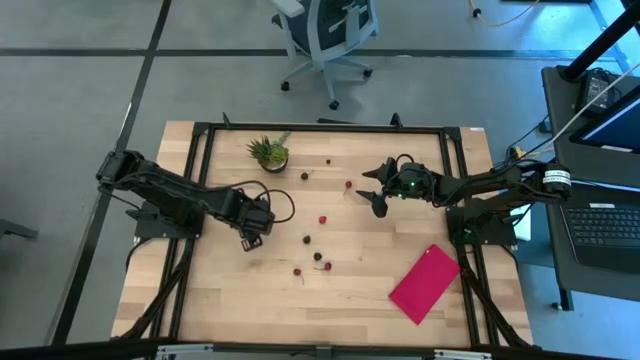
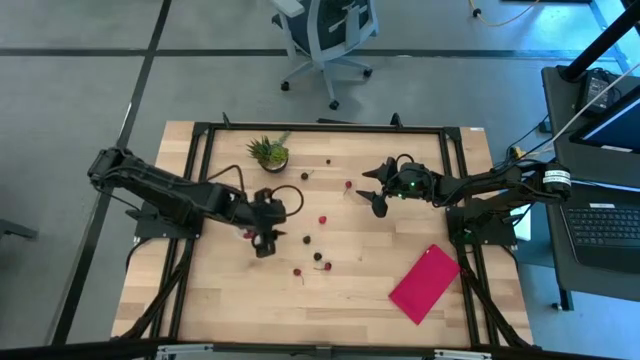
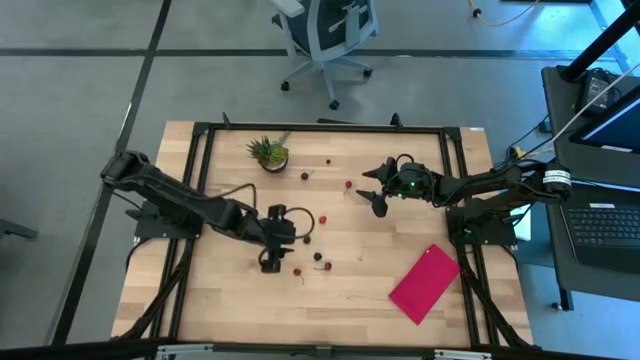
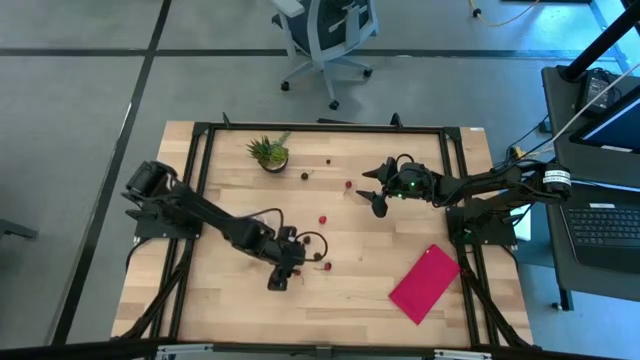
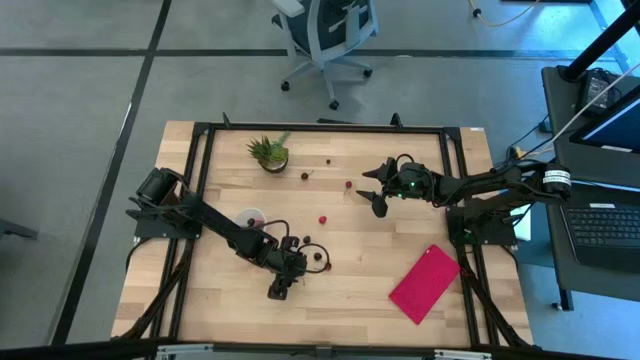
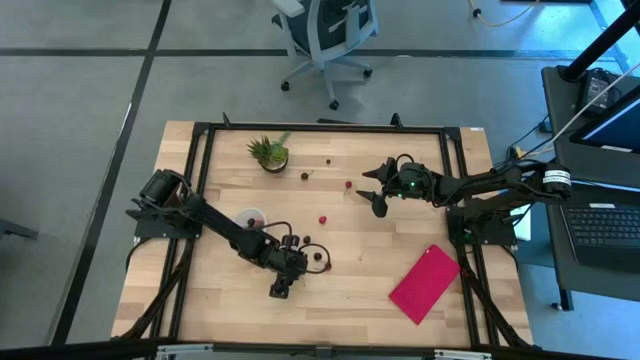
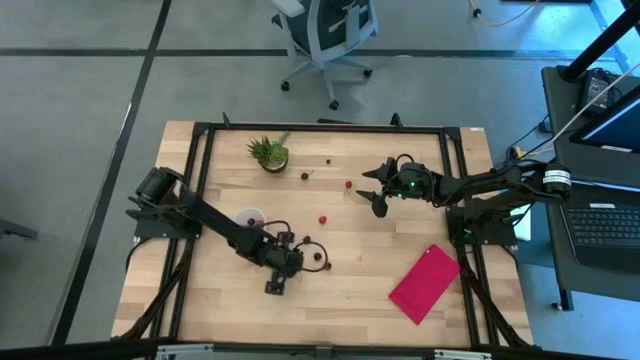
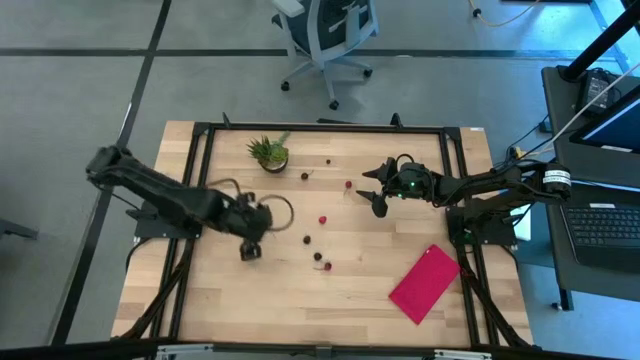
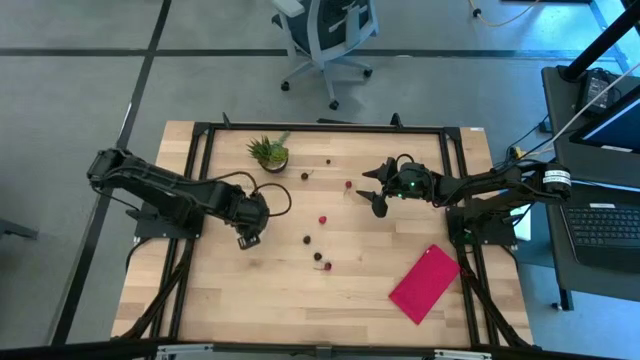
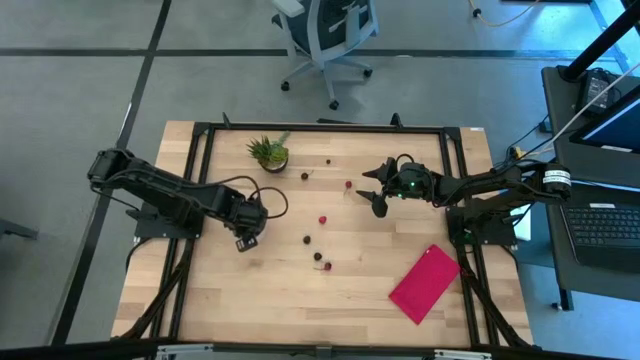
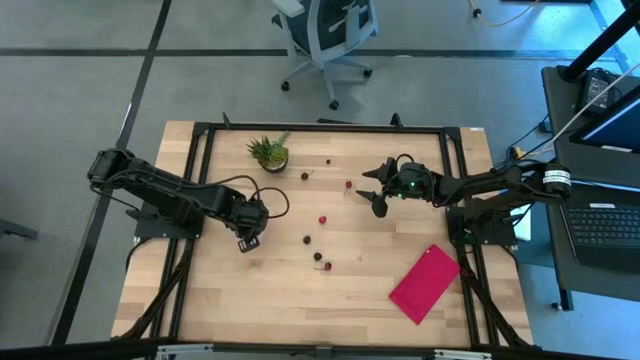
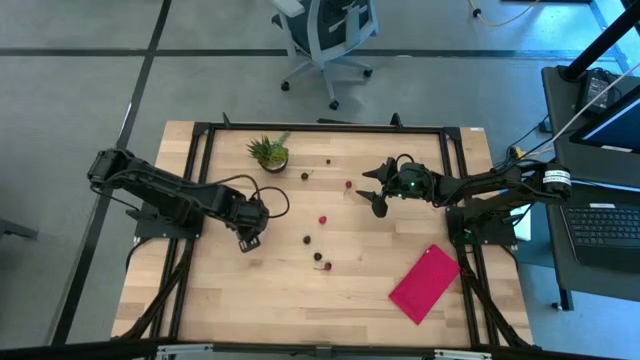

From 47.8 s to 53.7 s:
Task: Pick and placing Produce into tupperware
Put the red cherry into the transparent container

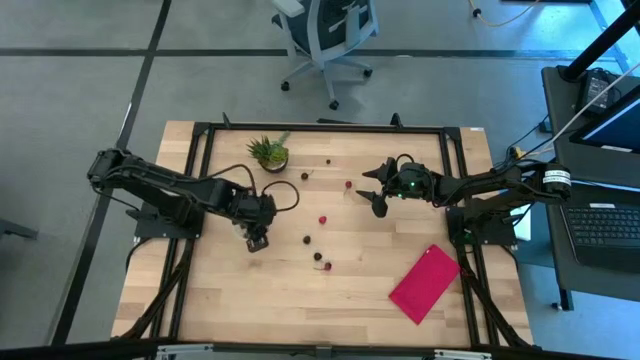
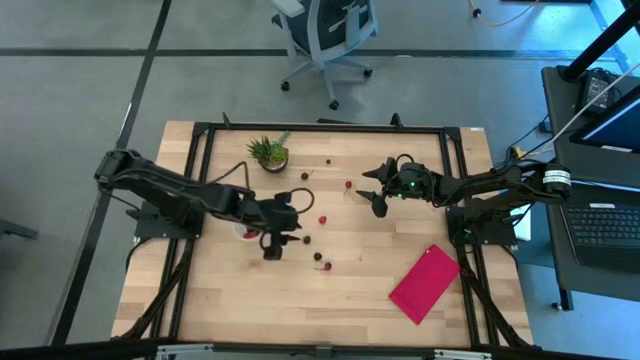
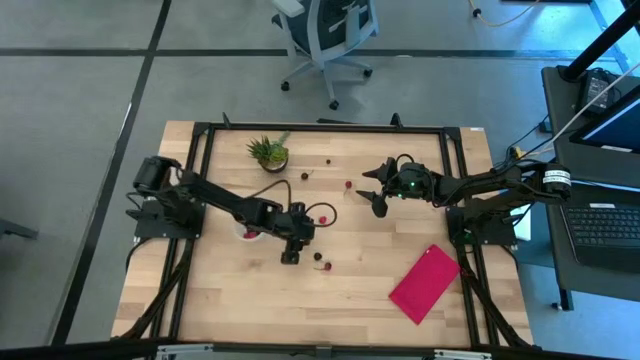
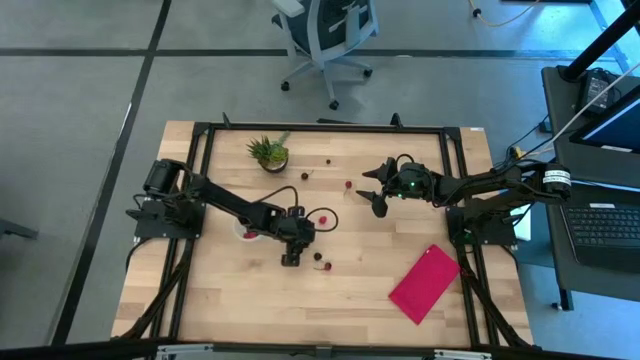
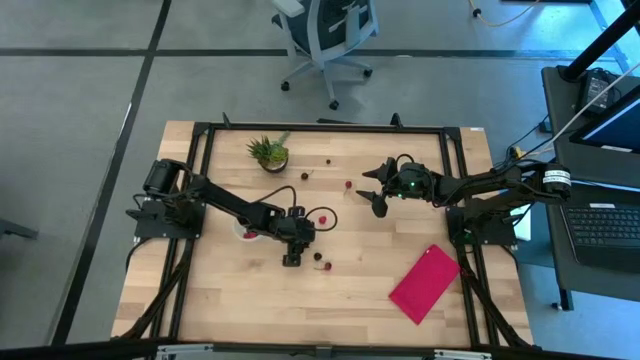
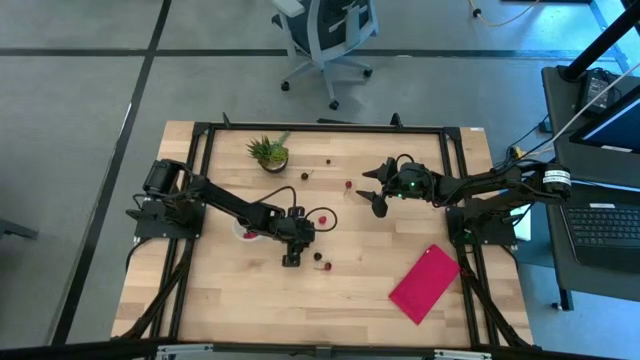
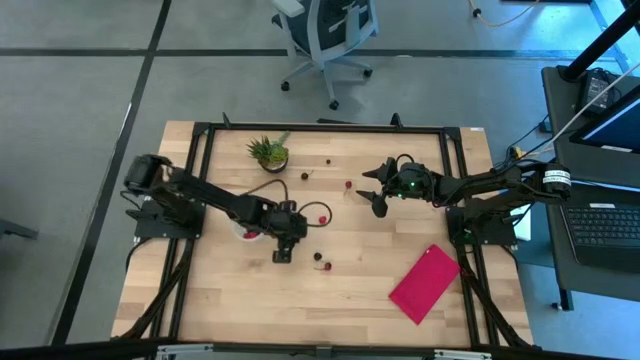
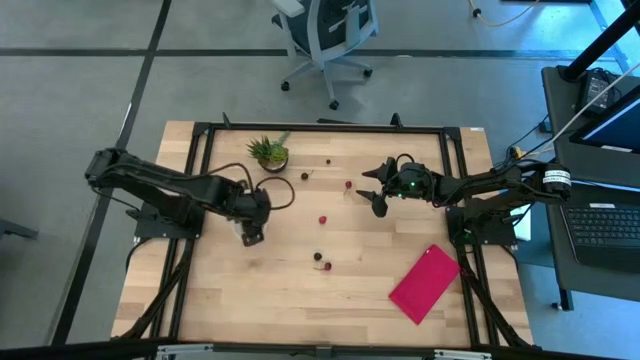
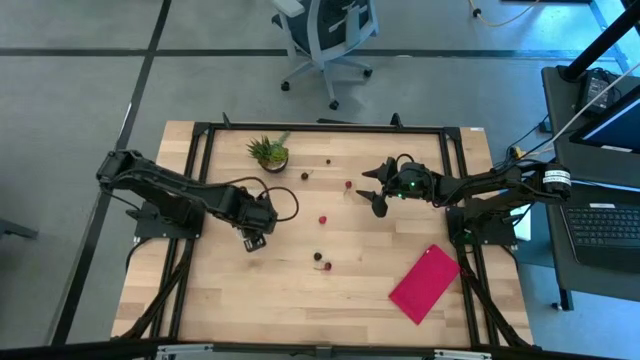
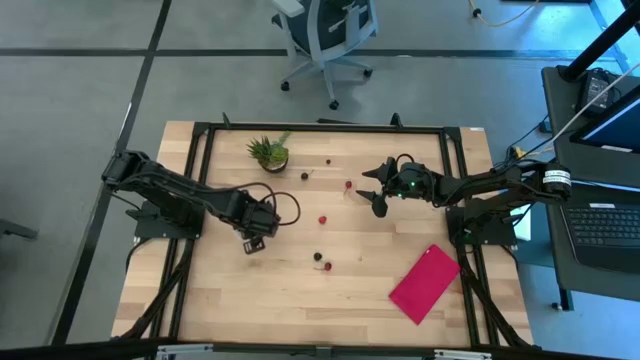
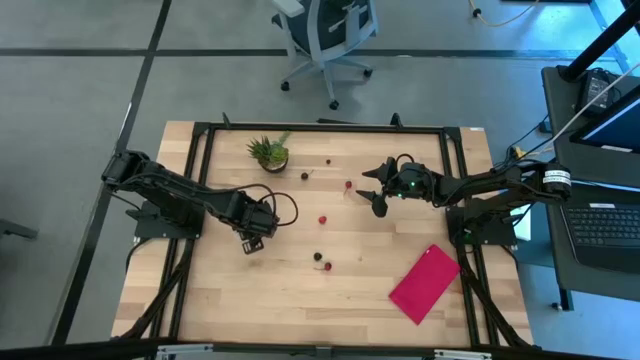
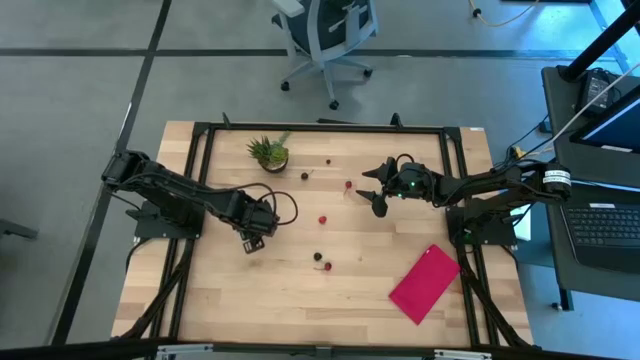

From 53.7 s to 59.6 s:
Put the blackberry into the transparent container

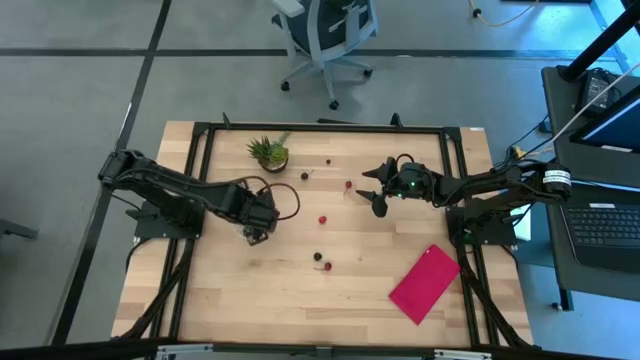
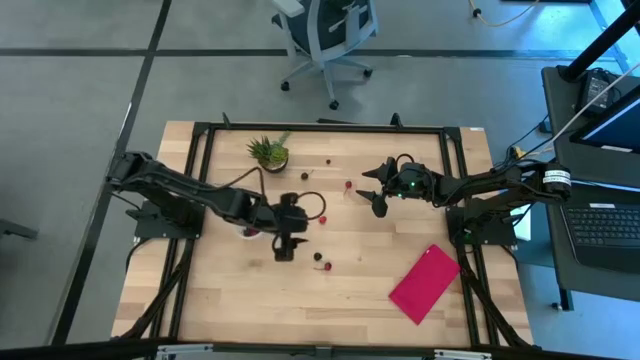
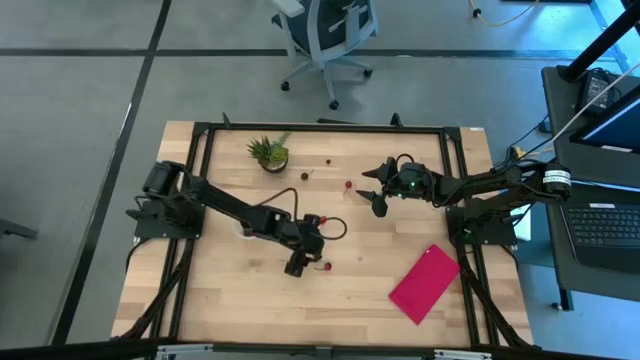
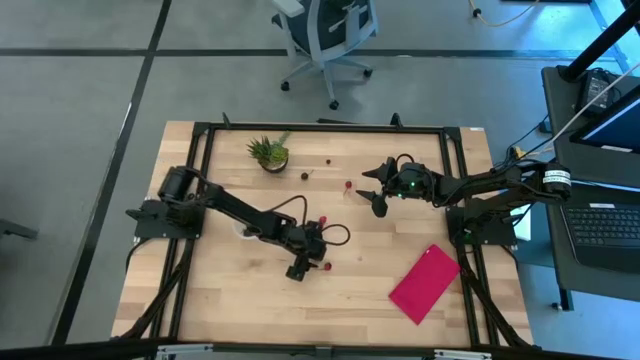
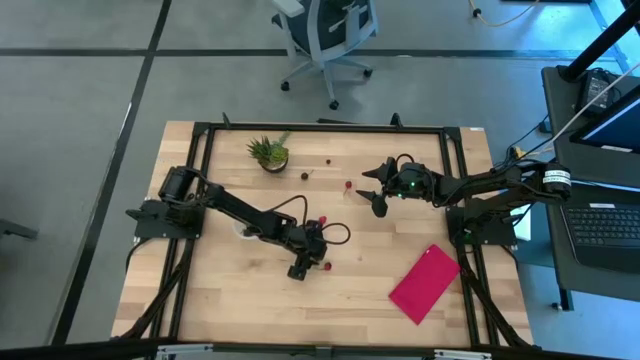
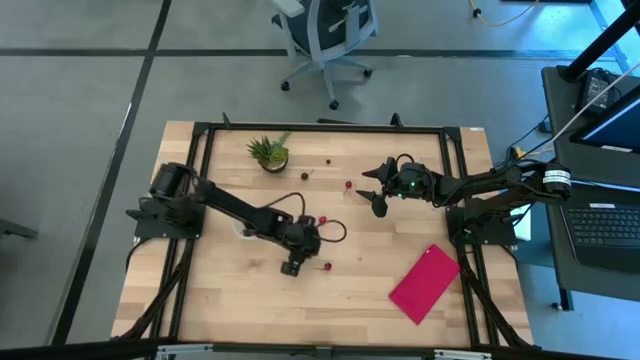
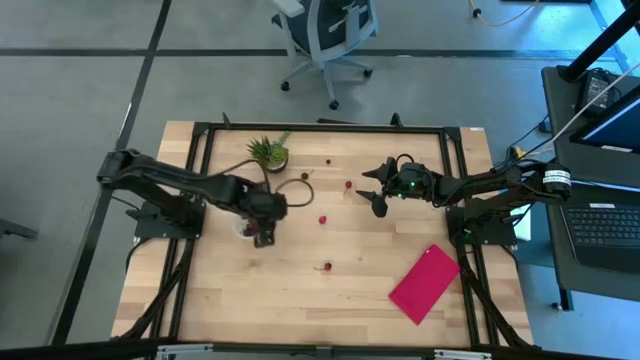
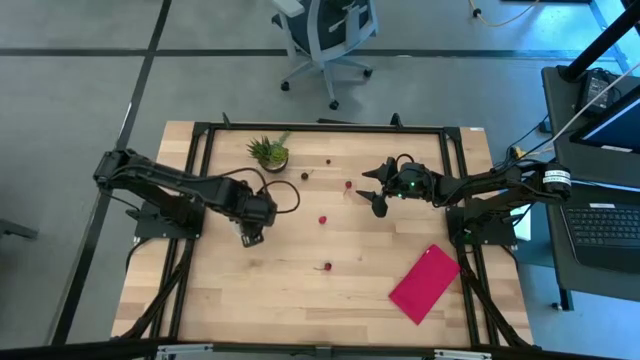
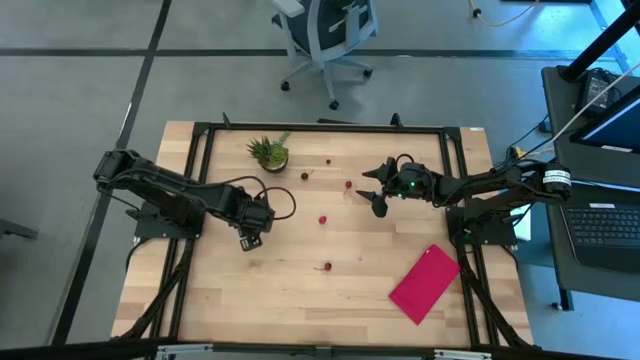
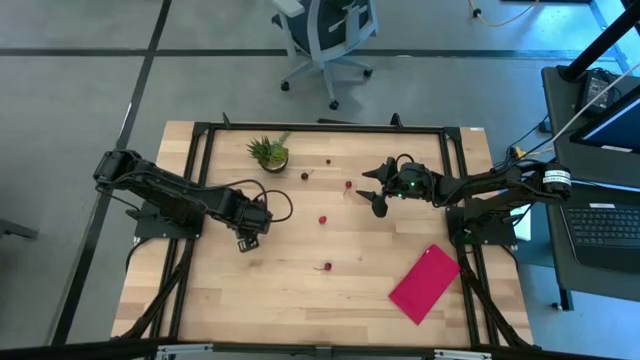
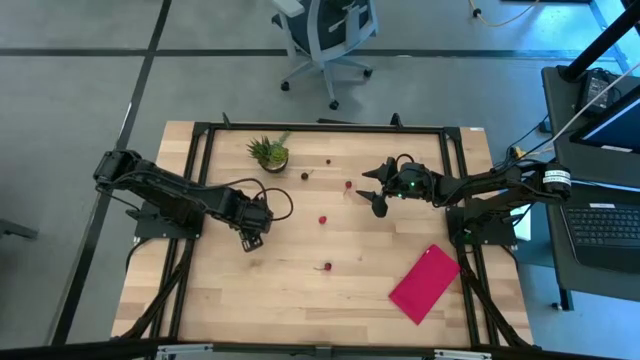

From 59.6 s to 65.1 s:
Put the black cherry into the transparent container

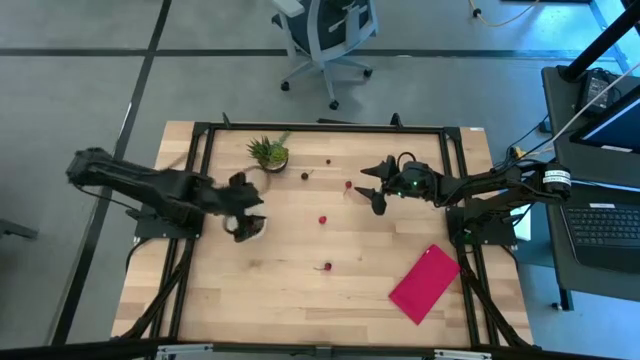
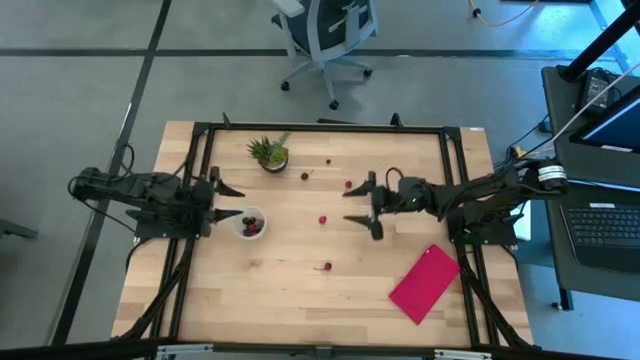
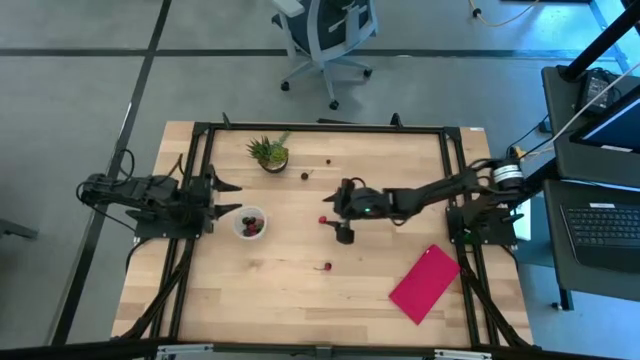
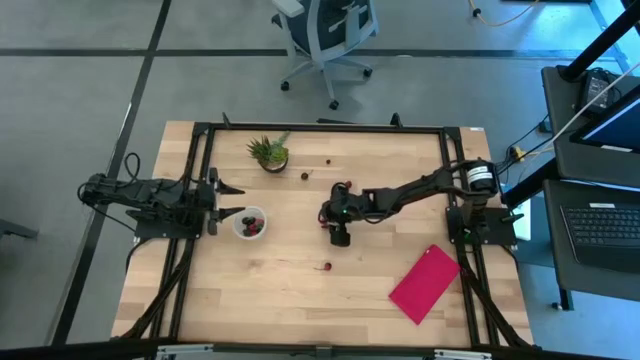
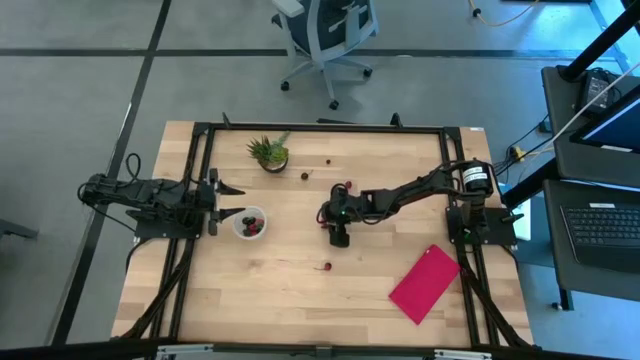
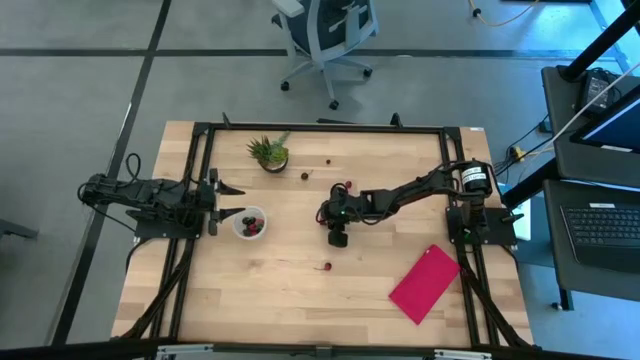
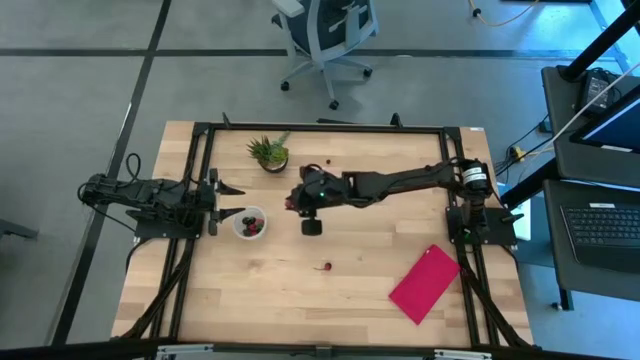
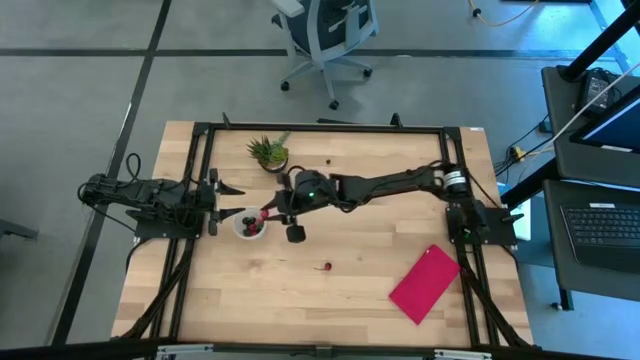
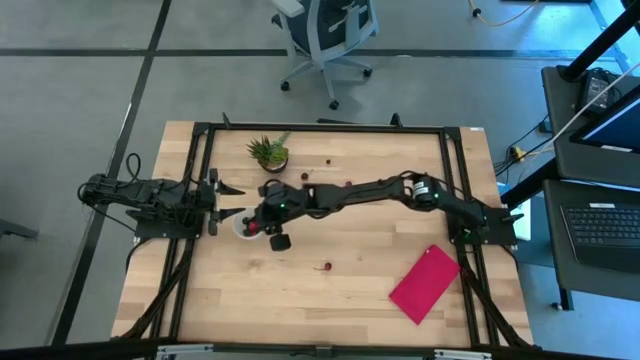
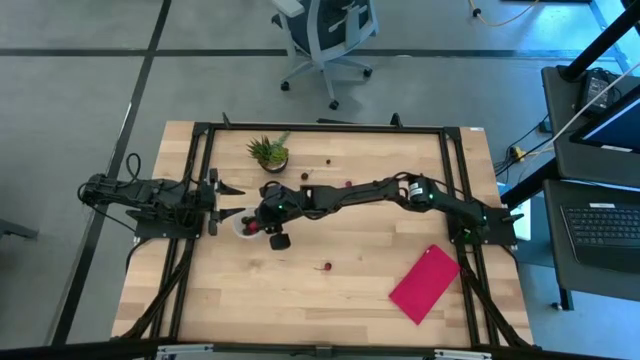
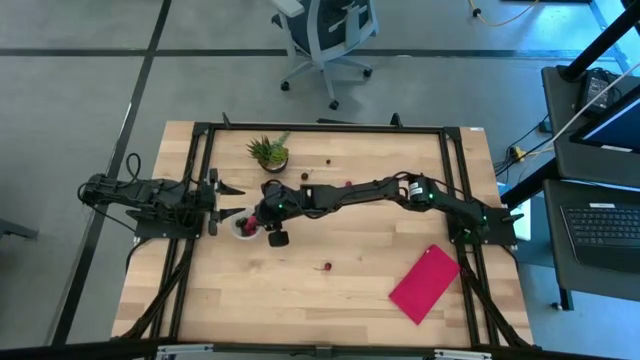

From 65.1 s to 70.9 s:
Put the red raspberry into the transparent container
